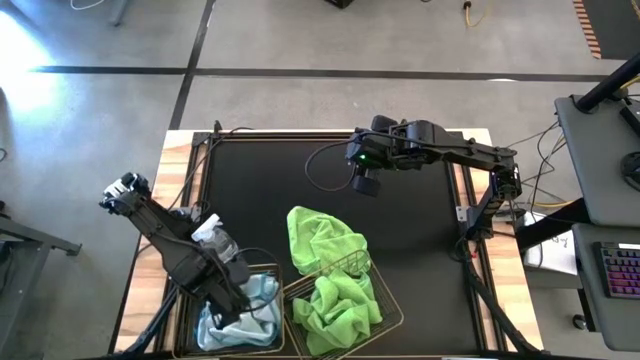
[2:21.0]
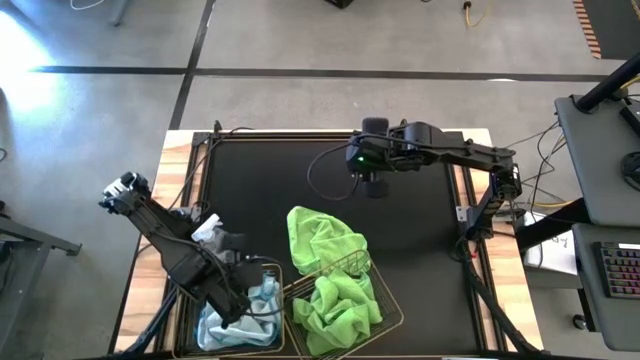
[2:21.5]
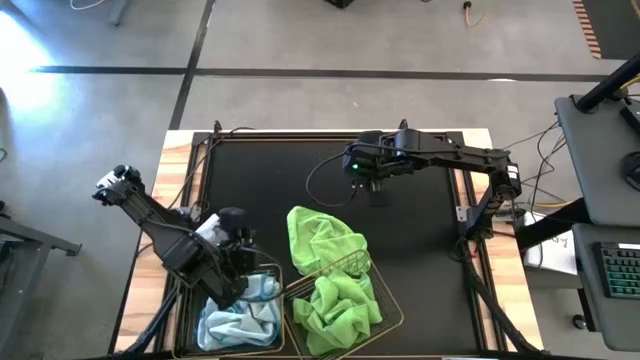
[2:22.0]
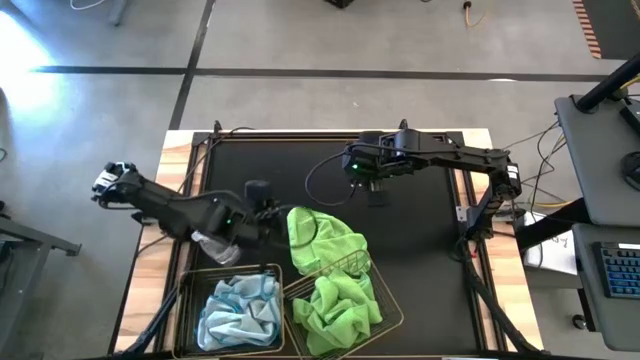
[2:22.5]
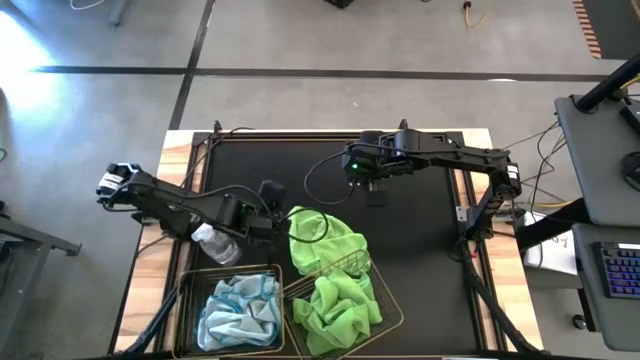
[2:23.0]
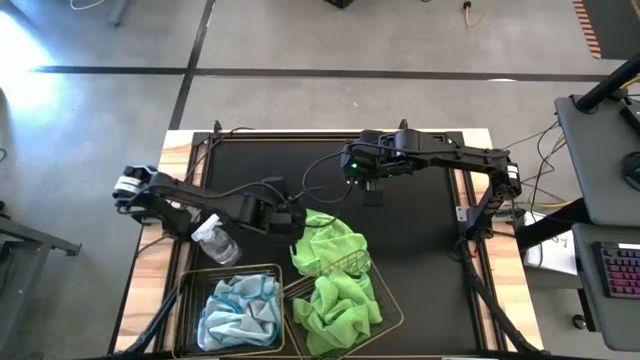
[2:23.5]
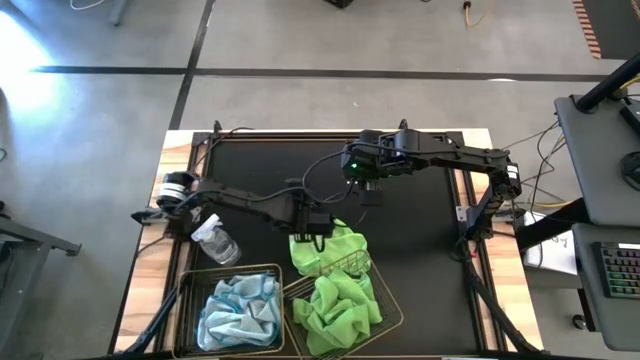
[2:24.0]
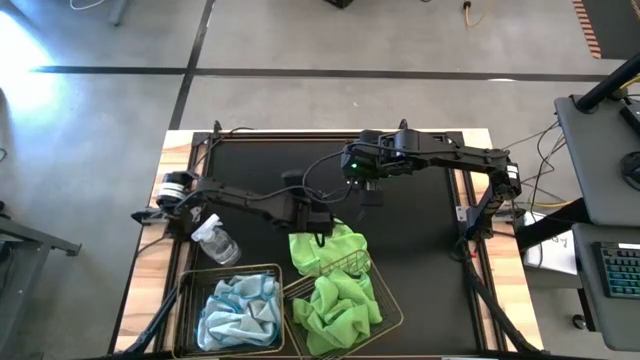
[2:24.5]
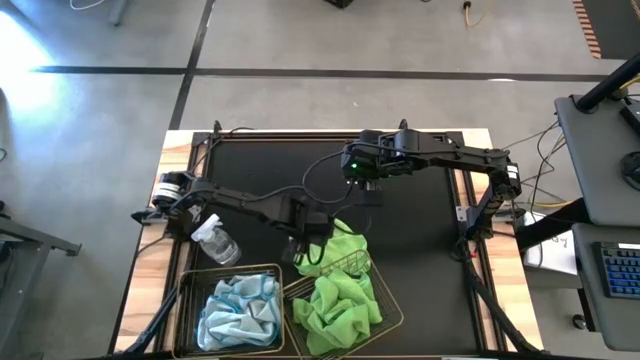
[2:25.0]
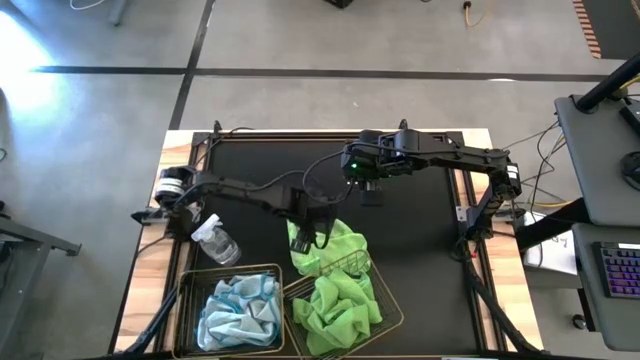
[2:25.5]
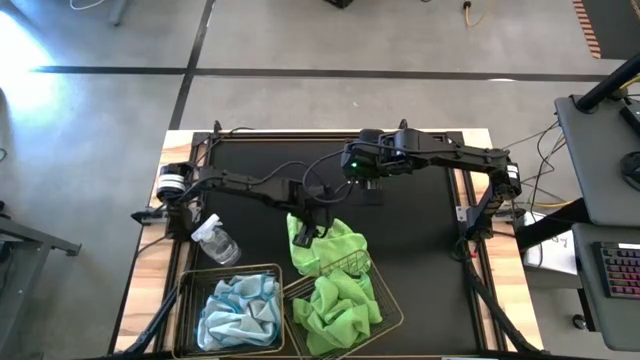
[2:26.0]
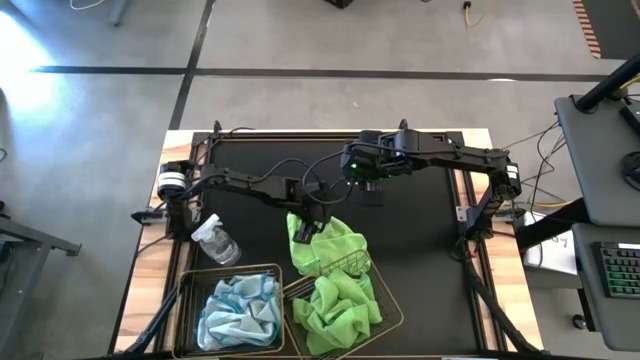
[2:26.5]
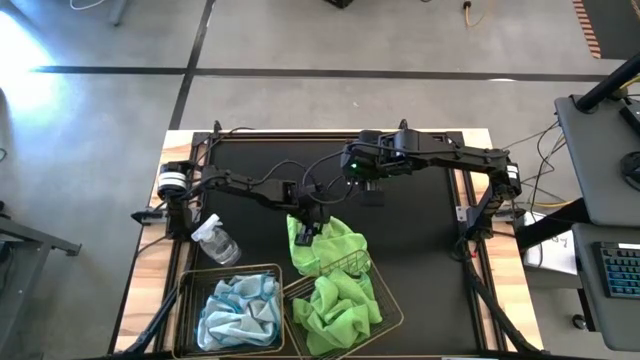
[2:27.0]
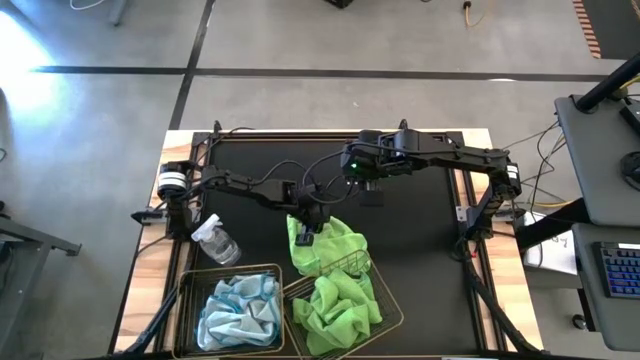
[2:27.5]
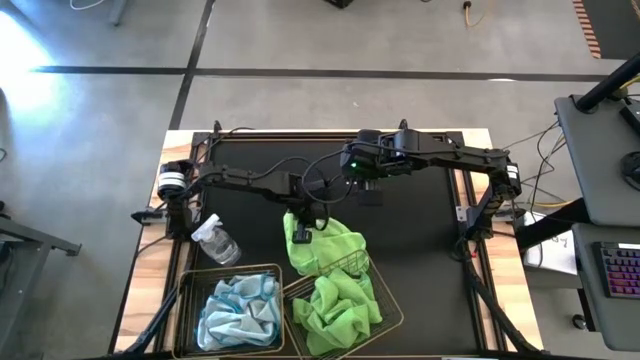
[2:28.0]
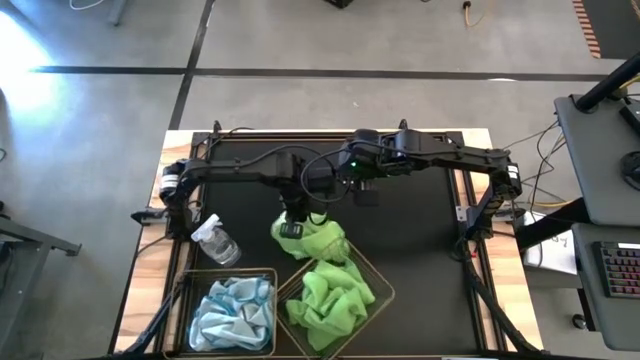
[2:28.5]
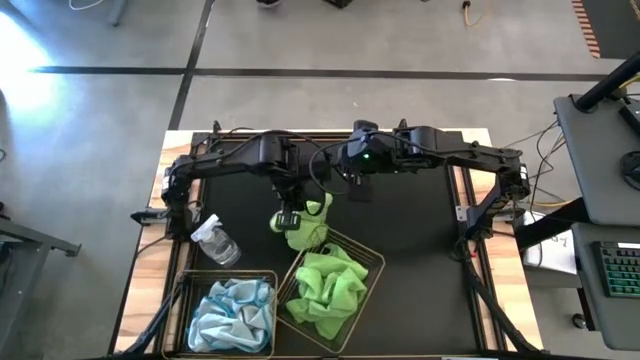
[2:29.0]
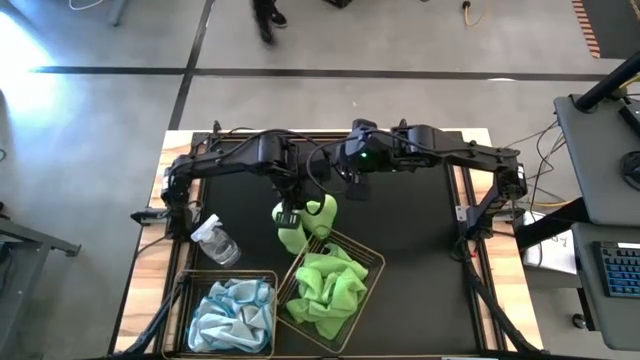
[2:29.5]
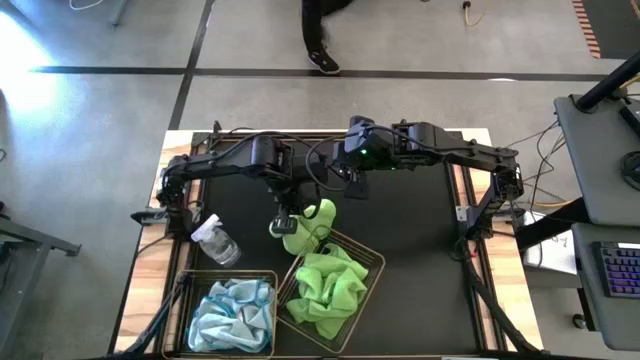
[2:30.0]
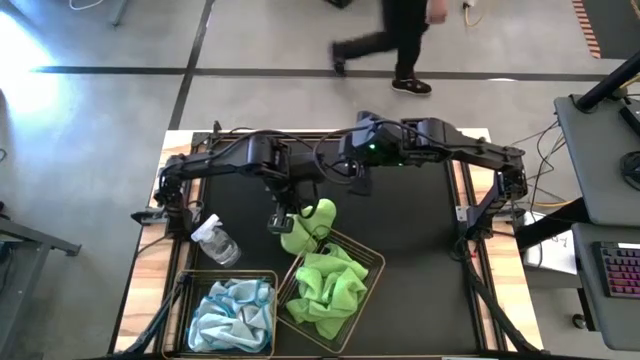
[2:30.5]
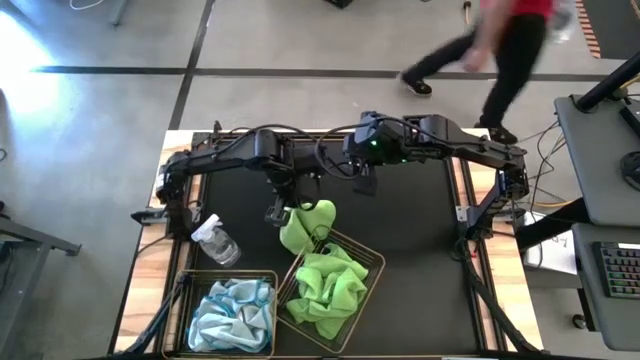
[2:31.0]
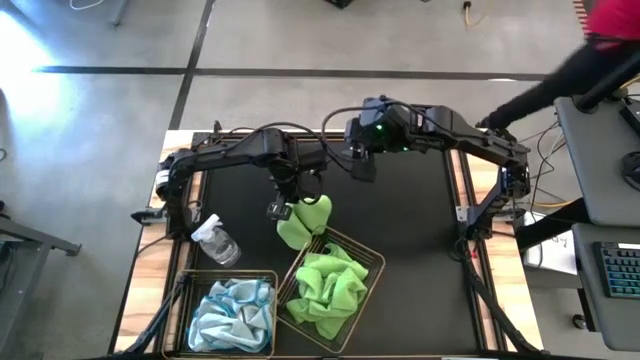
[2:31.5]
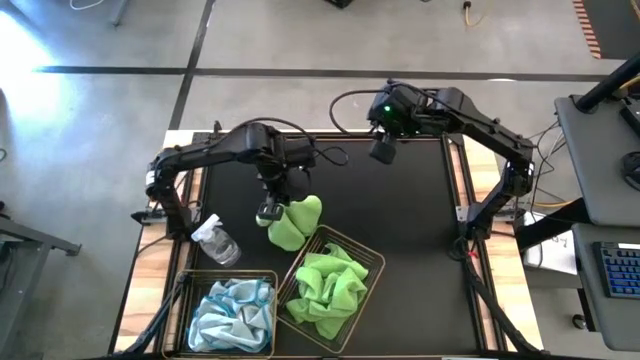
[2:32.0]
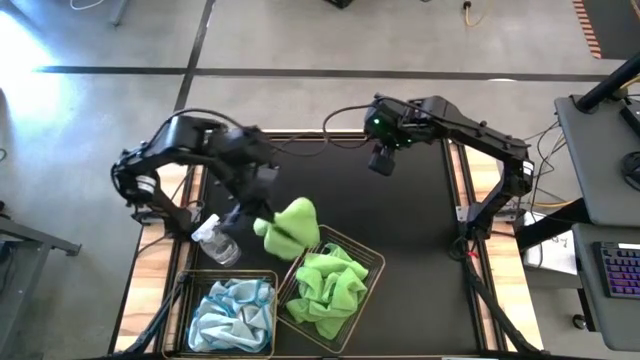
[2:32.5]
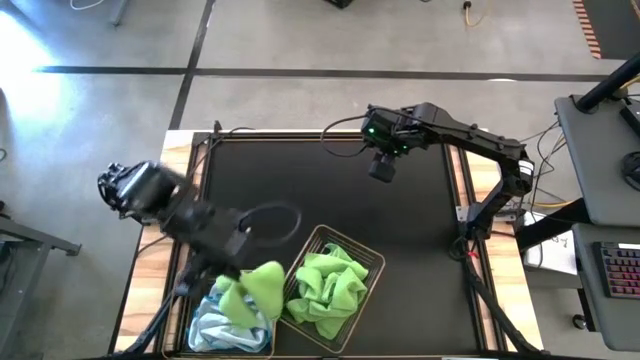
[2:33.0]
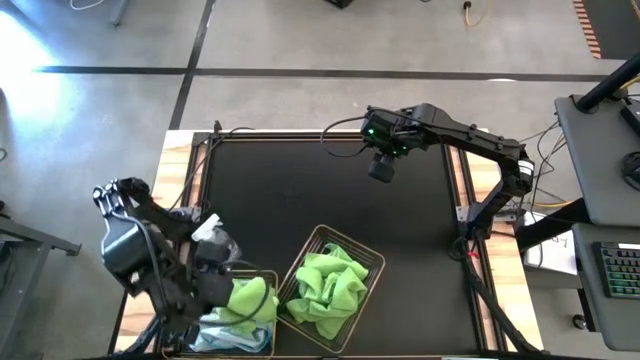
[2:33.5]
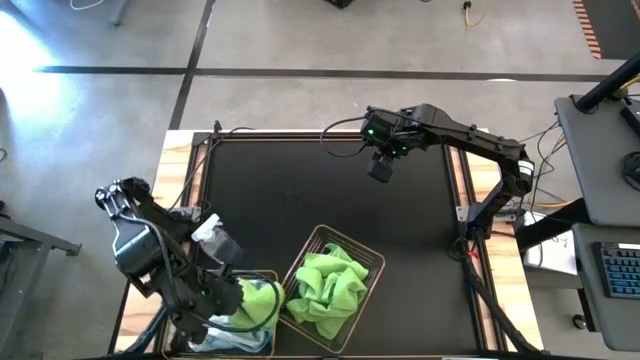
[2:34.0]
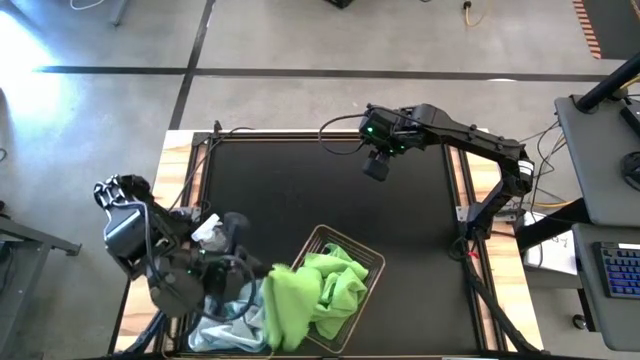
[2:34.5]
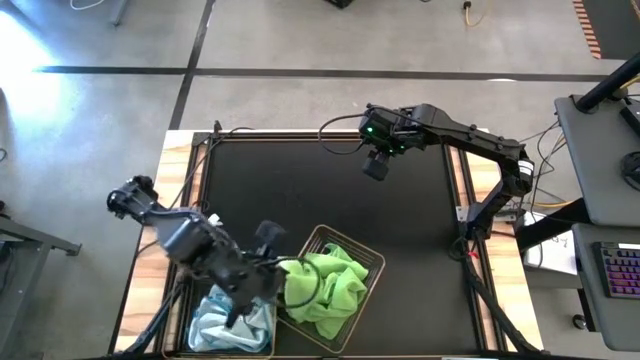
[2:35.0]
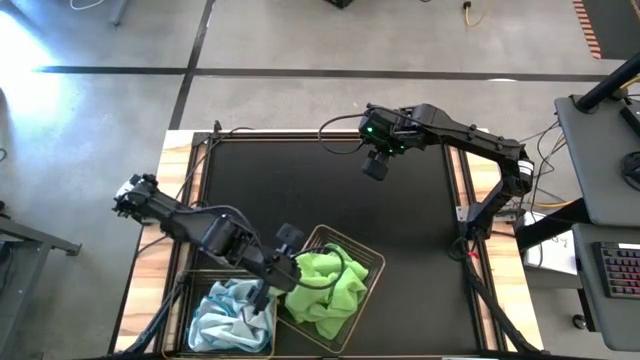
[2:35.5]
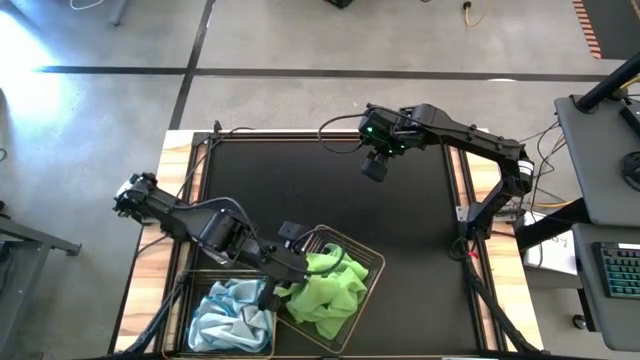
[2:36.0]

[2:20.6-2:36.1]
Task: Sort microfiber towel by color & place in baskets
Put the green towel into the right wire basket

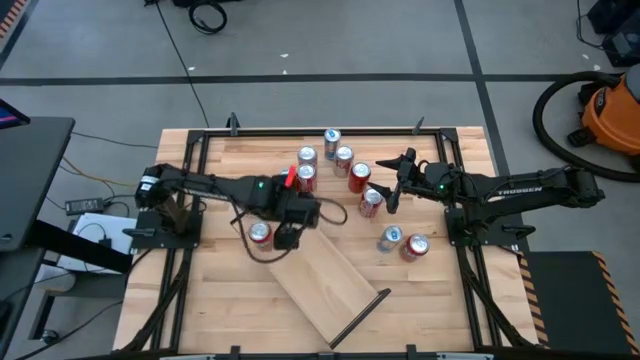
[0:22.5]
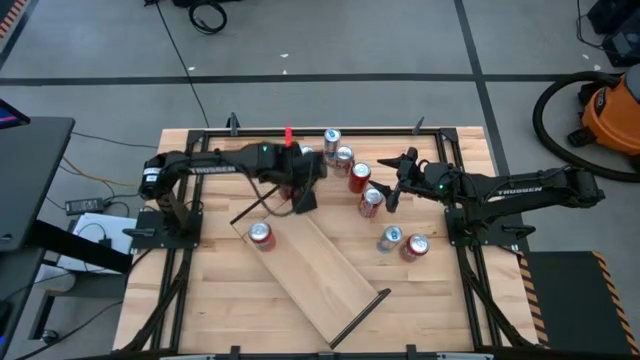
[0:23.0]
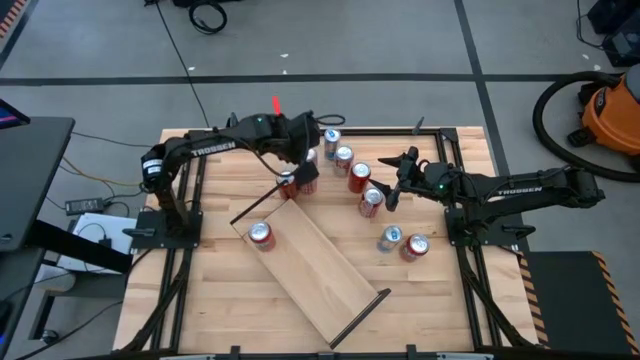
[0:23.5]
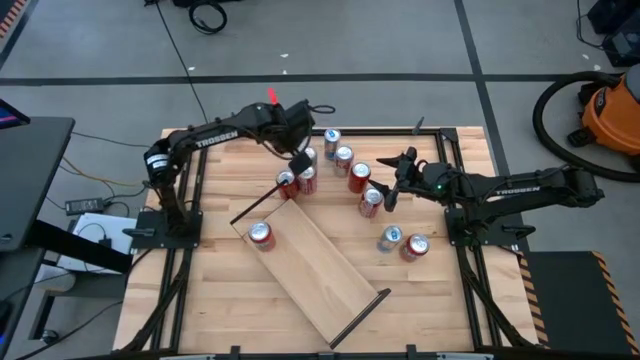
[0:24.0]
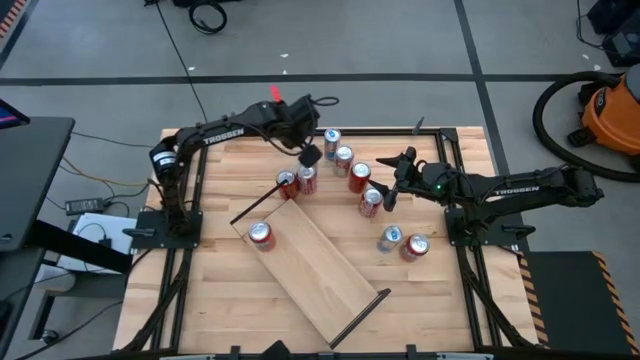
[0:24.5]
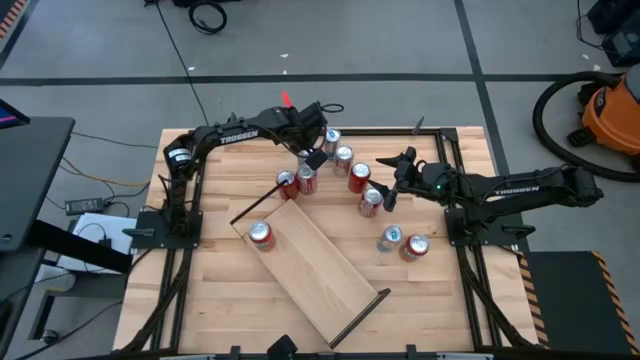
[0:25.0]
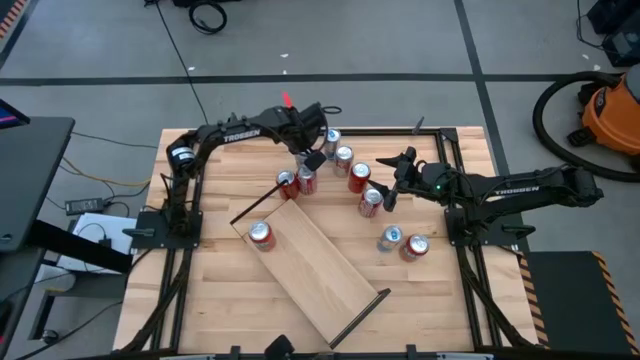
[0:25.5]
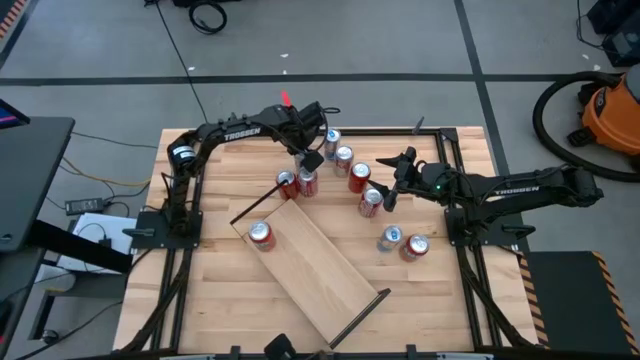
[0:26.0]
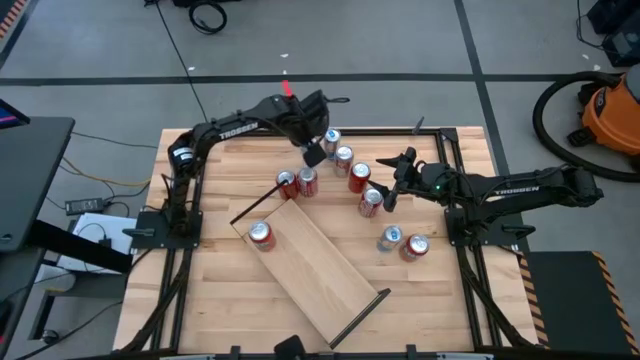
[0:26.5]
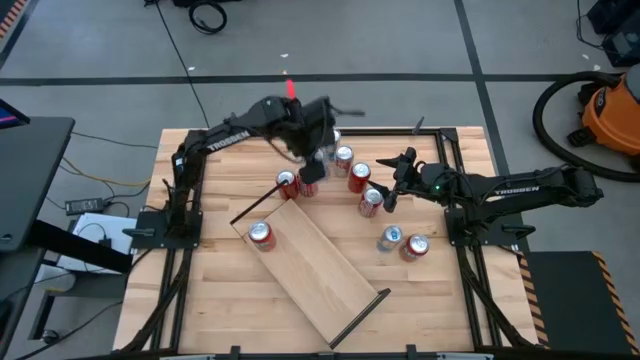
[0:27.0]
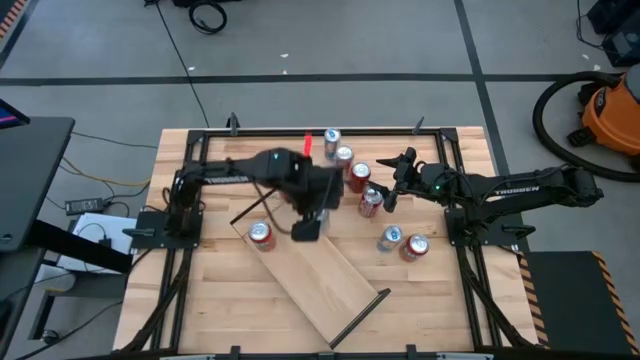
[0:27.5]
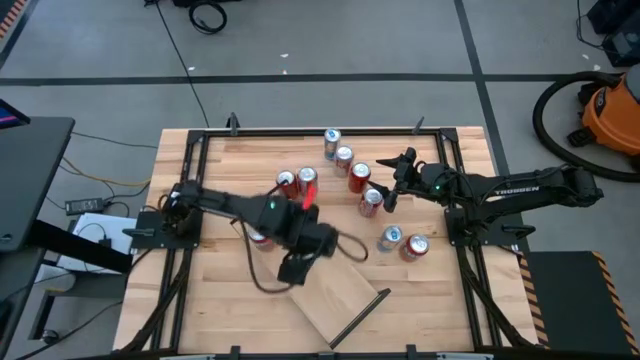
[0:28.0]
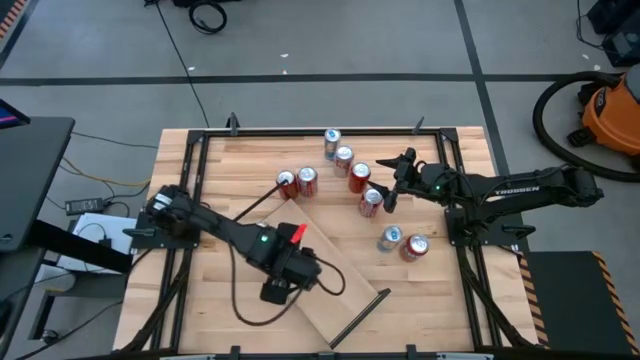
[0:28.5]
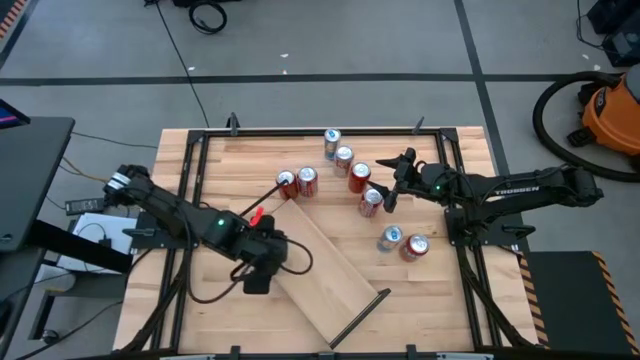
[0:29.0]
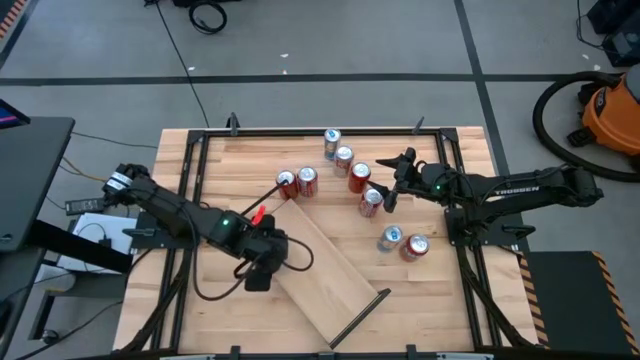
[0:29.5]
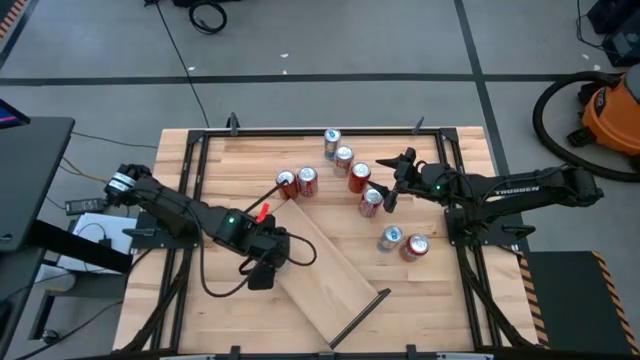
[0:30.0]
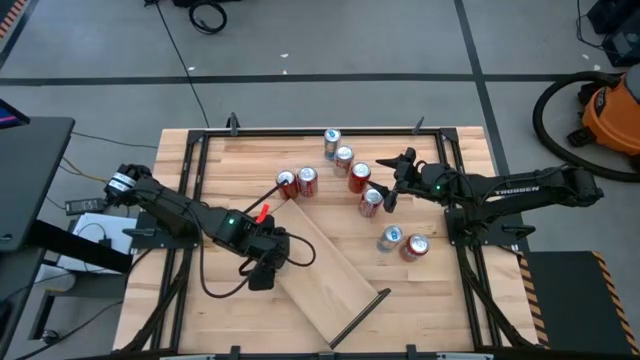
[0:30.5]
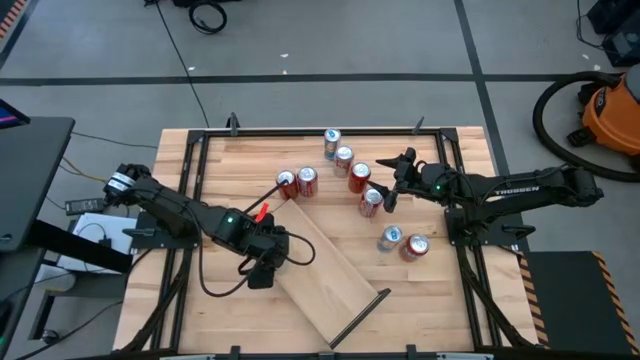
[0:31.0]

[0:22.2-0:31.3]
Task: Place canned beverage on shelf
Put the left silver soda can on the shelf
